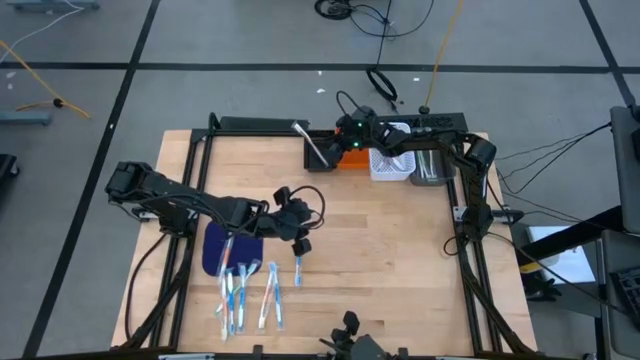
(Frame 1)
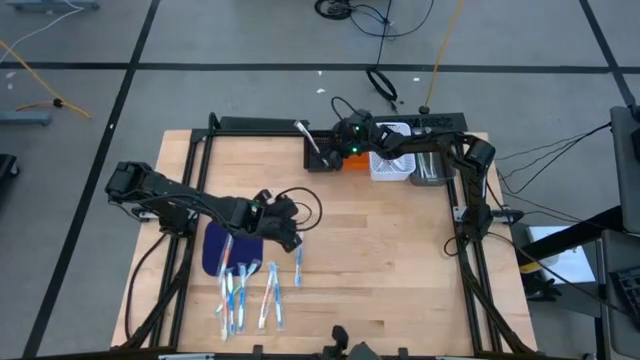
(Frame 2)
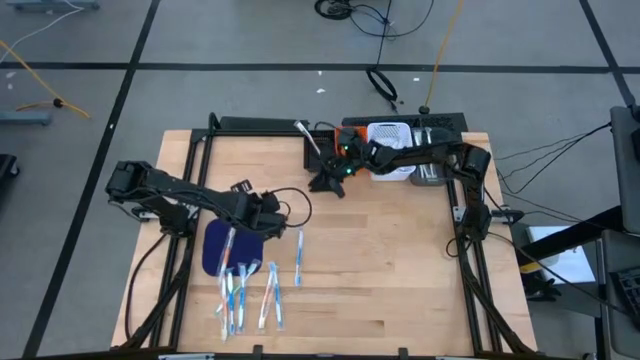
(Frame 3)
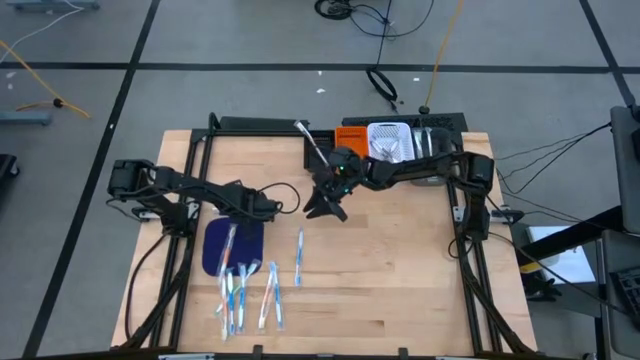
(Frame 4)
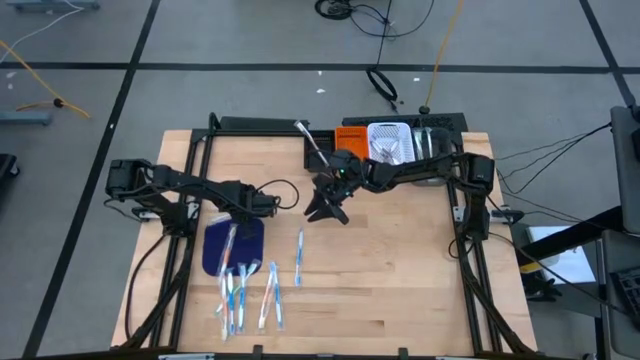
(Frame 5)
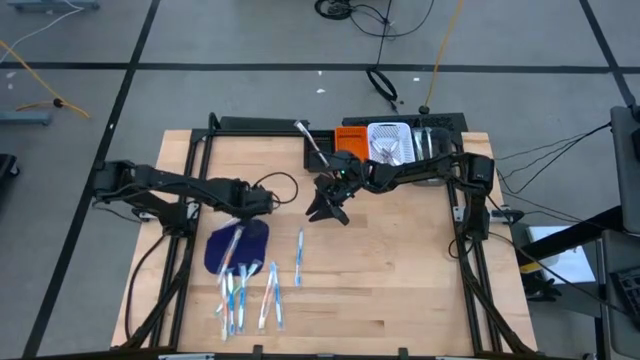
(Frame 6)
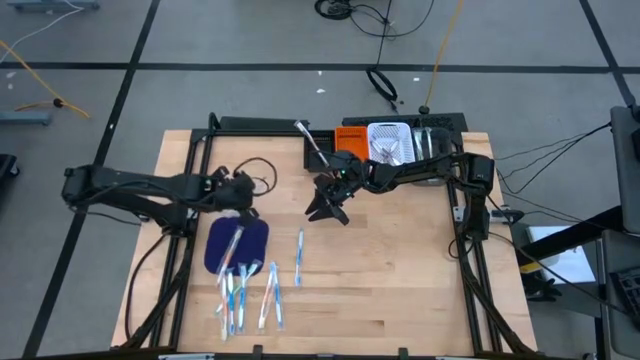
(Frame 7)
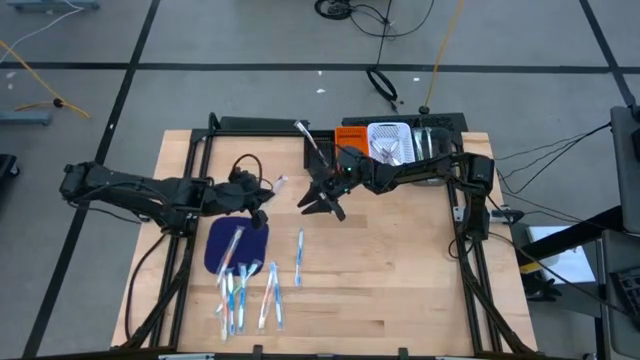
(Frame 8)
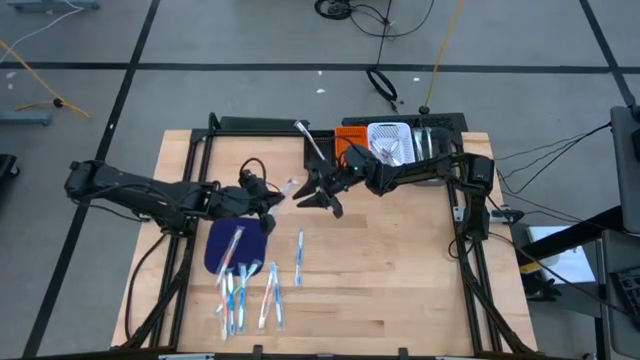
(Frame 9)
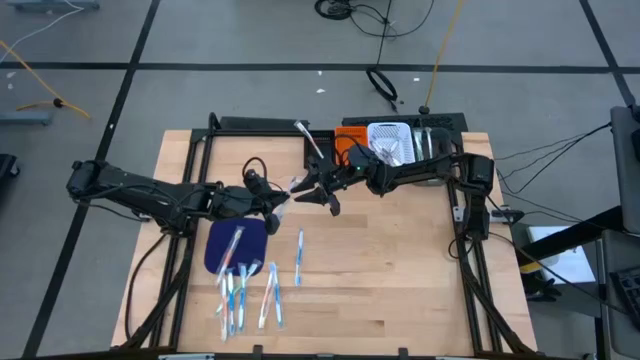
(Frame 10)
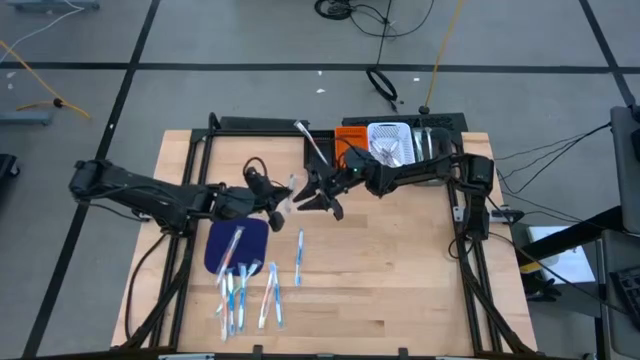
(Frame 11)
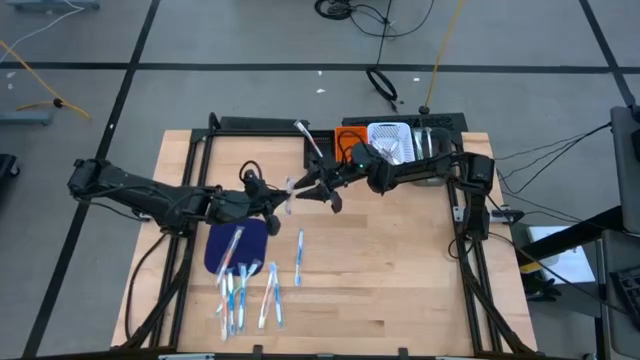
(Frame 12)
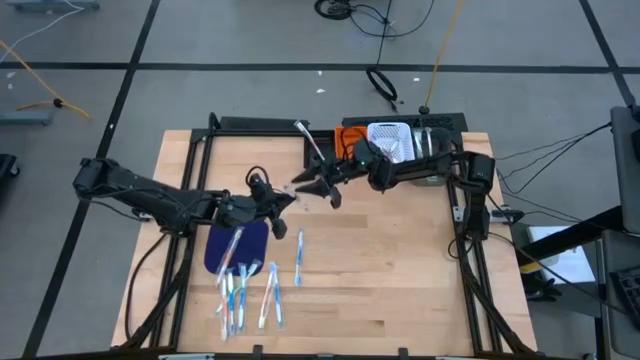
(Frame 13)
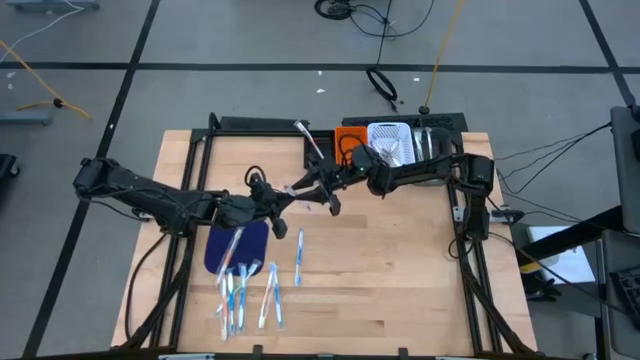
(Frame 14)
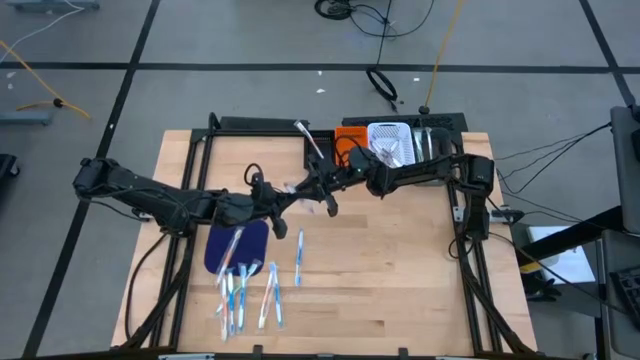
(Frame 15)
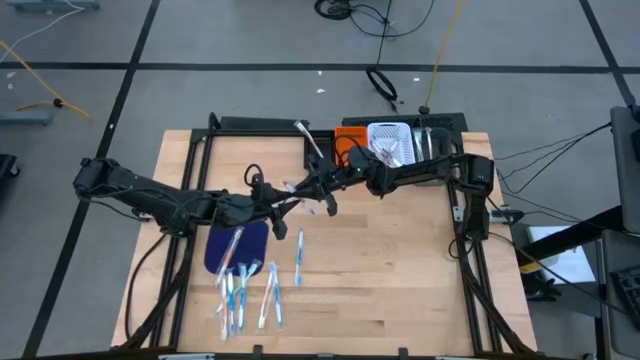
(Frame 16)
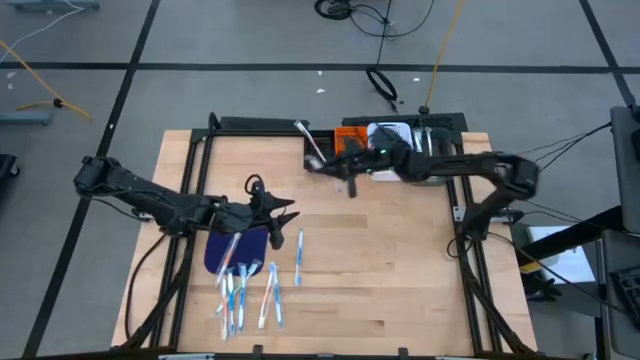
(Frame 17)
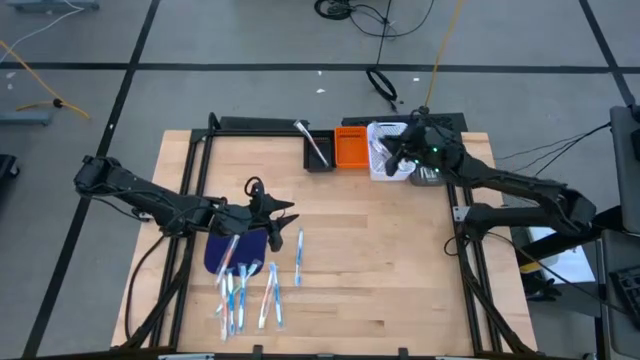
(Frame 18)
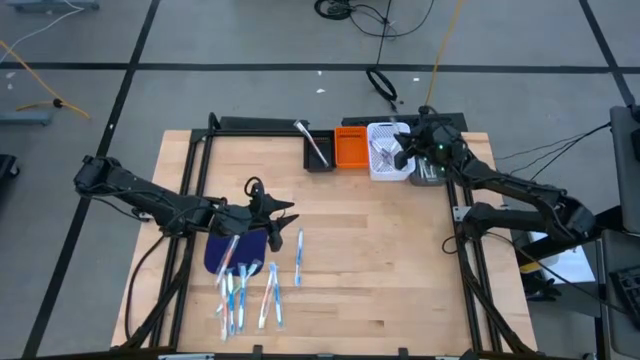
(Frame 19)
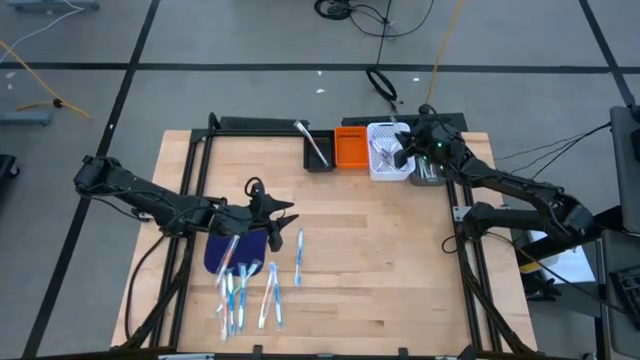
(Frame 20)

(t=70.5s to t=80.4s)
Task: Pick & Place Toothbrushes
Put the purple toothbrush into the white bin

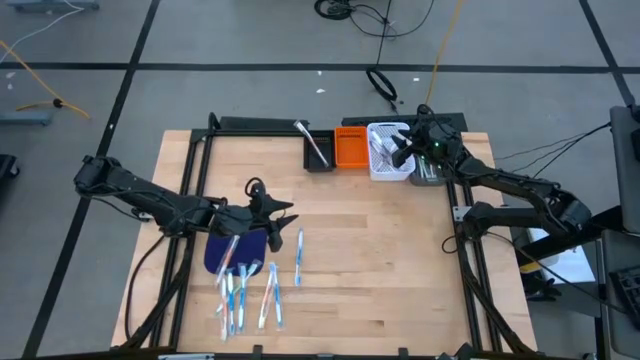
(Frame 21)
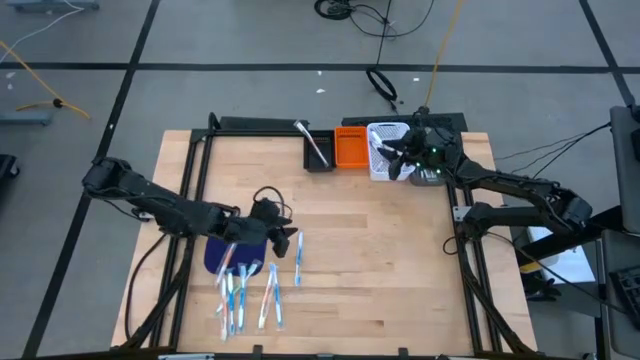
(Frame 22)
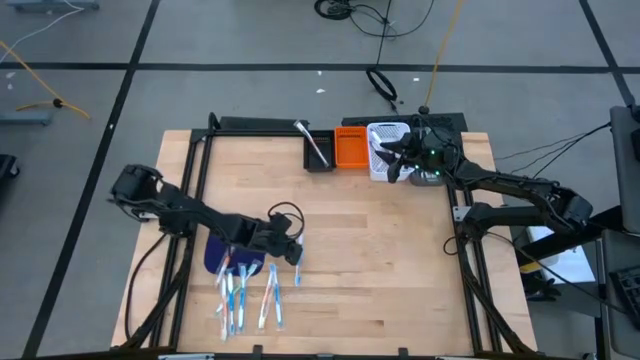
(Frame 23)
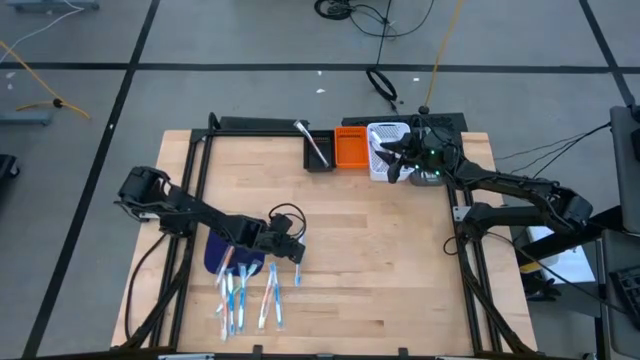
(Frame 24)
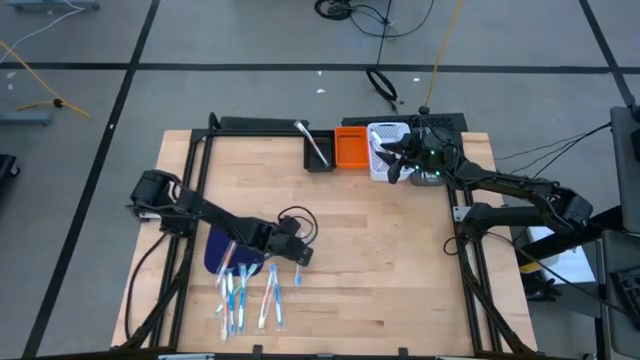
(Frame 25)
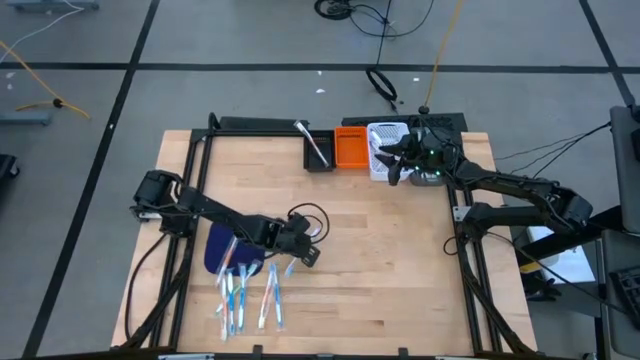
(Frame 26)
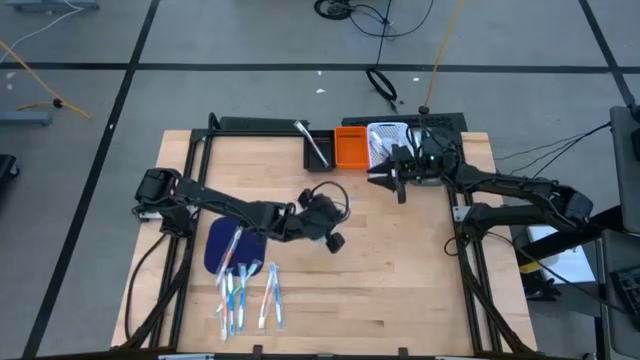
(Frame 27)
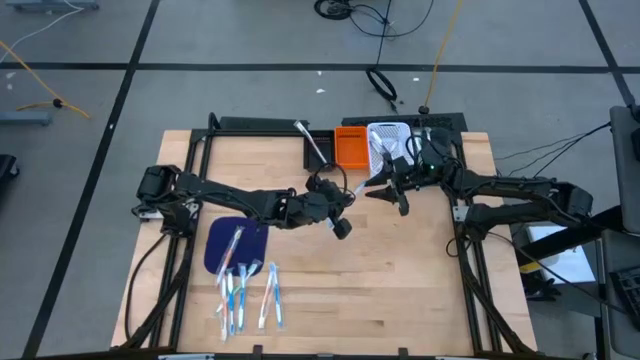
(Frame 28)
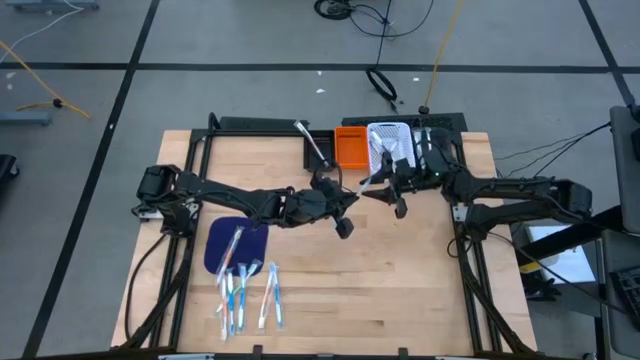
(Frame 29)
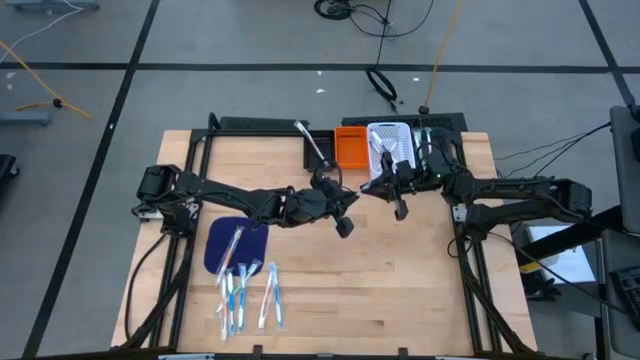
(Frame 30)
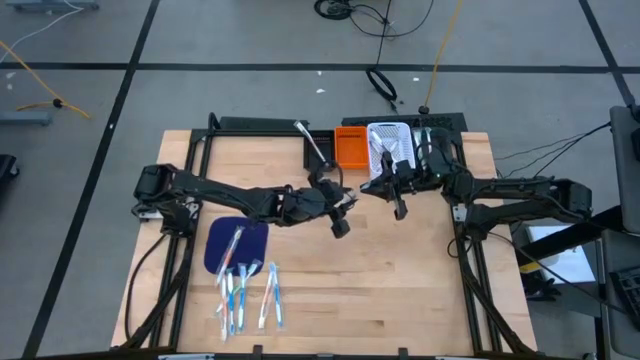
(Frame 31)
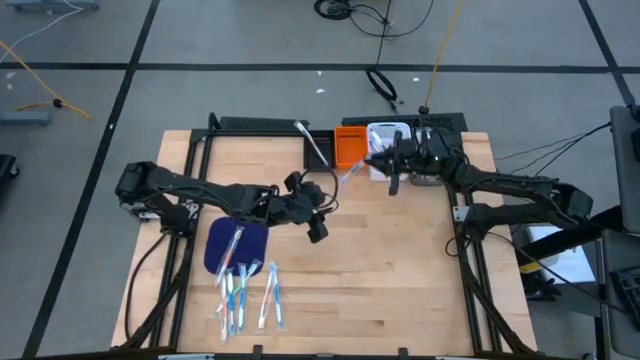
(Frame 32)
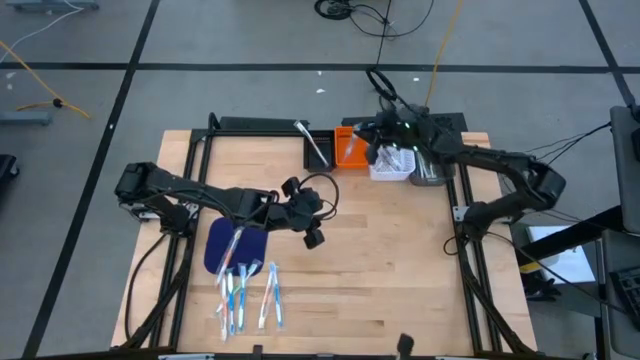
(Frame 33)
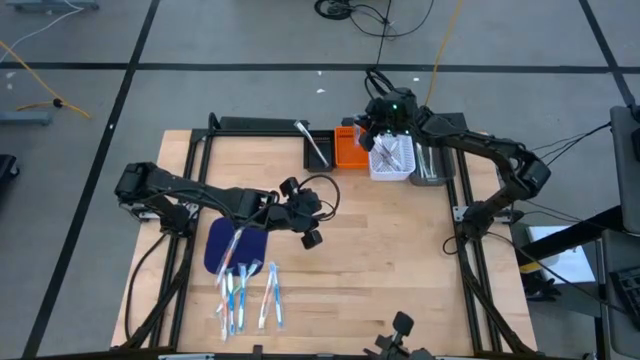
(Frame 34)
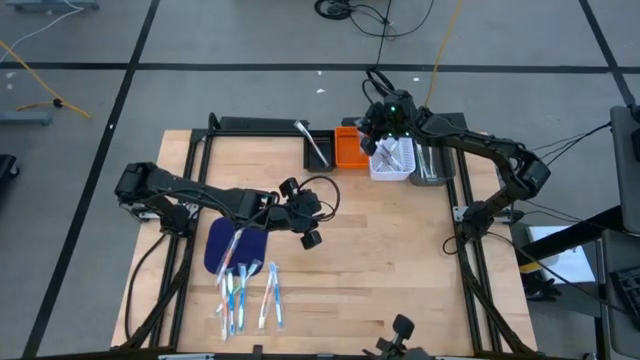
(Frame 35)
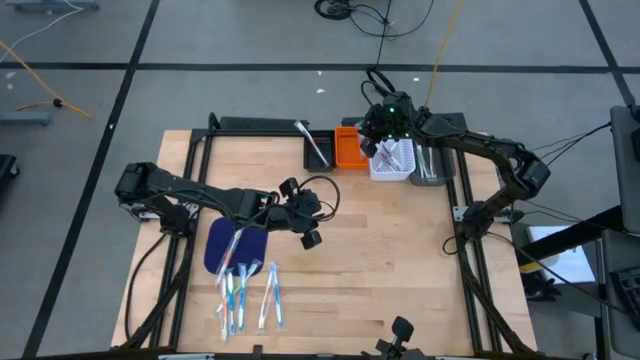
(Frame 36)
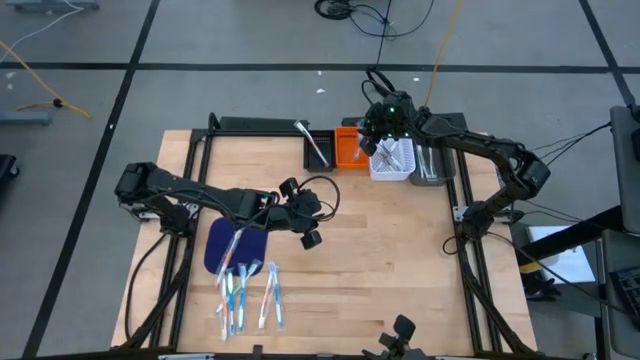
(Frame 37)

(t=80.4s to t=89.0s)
Put the blue toothbrush into the orange bin

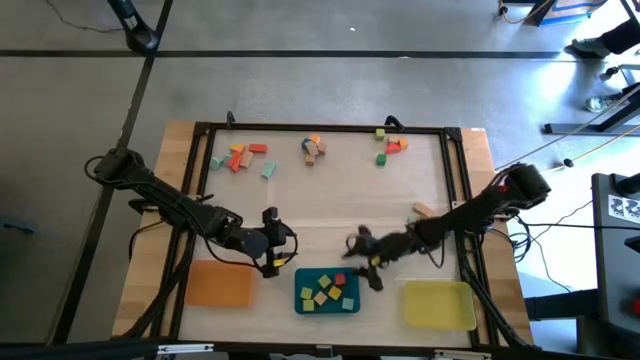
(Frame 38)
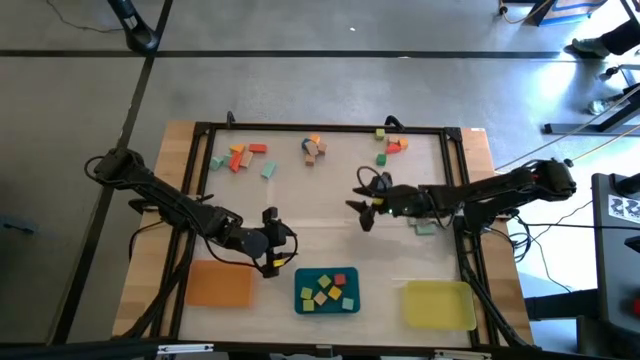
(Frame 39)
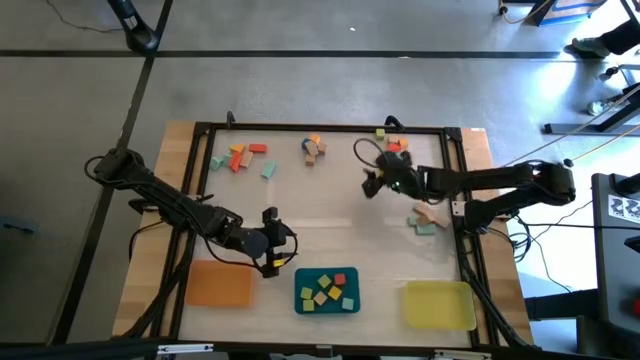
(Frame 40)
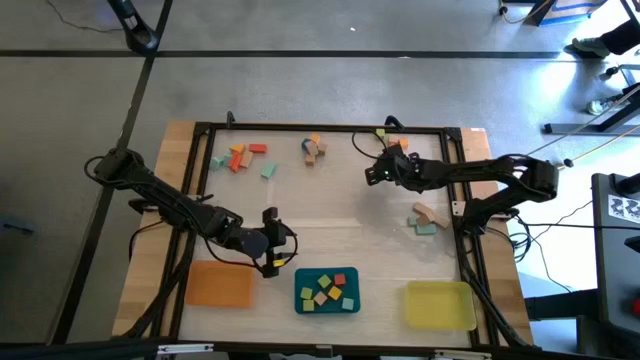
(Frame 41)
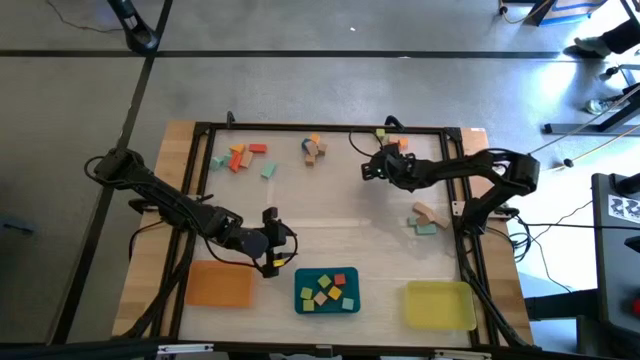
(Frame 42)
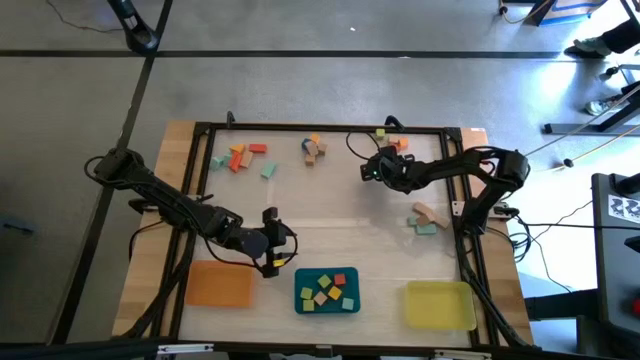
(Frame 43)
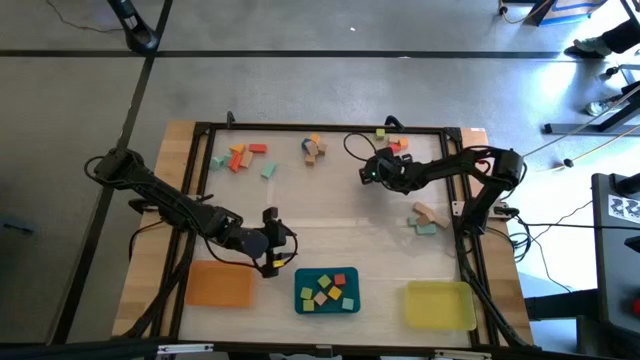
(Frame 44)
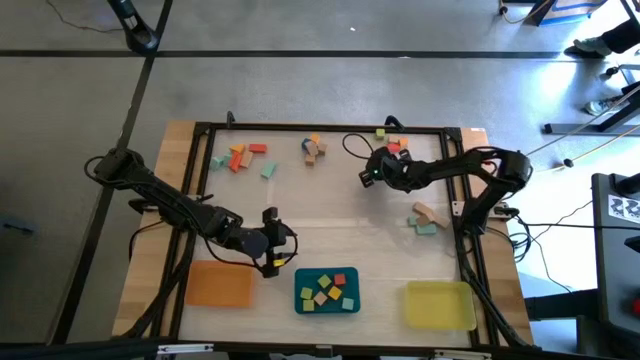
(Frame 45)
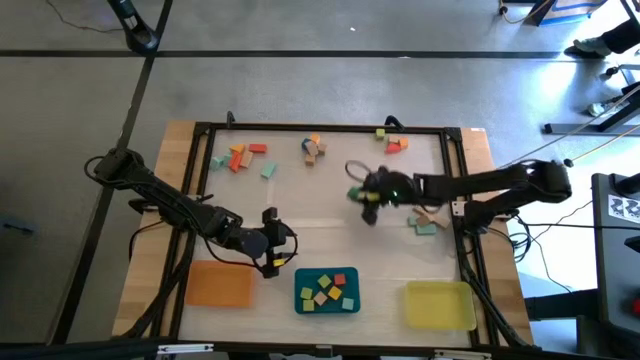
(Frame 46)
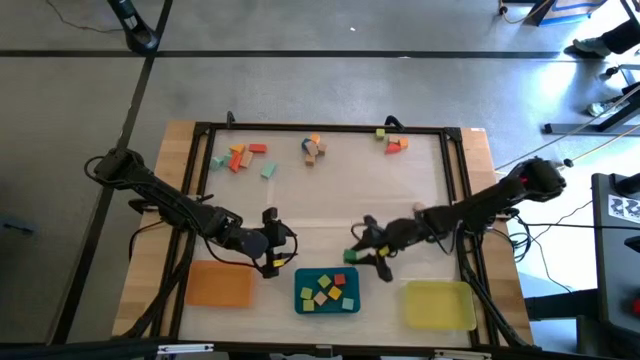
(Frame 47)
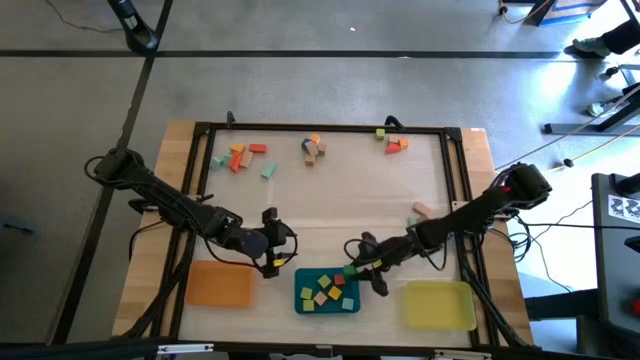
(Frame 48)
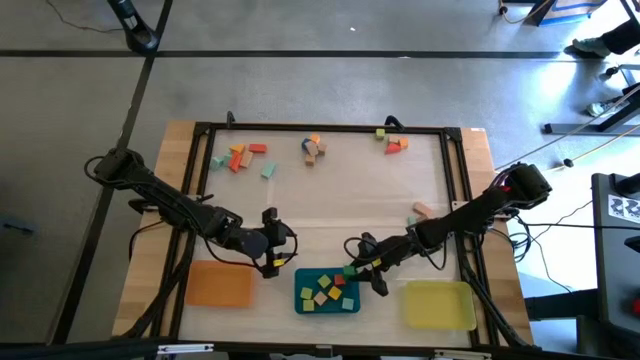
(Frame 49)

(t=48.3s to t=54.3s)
Task: Sort blocks by size
Put the green cube block into the blue bin
